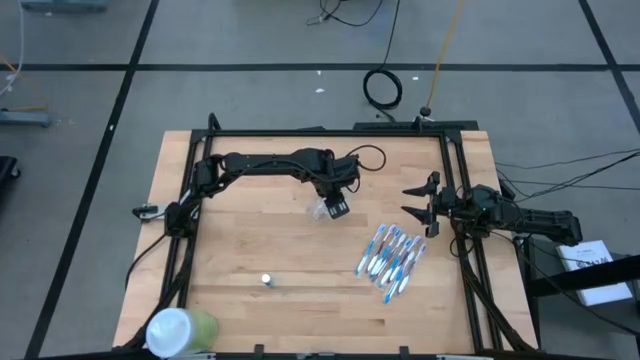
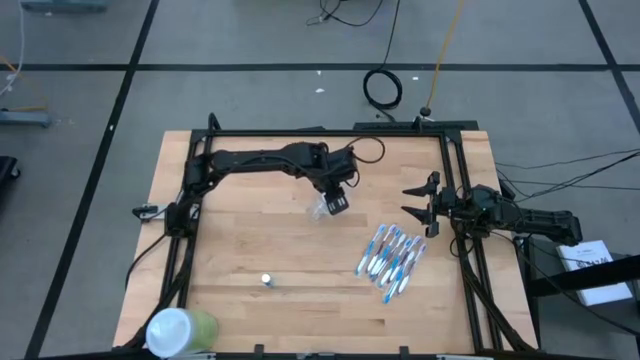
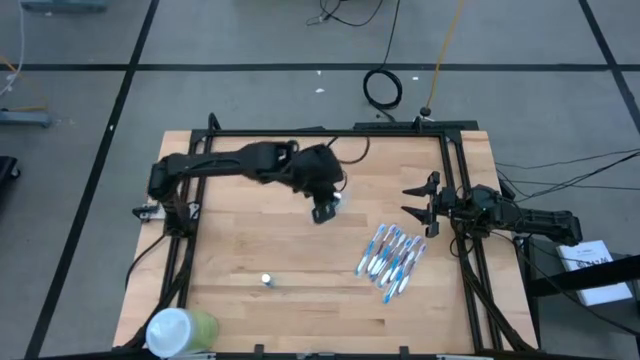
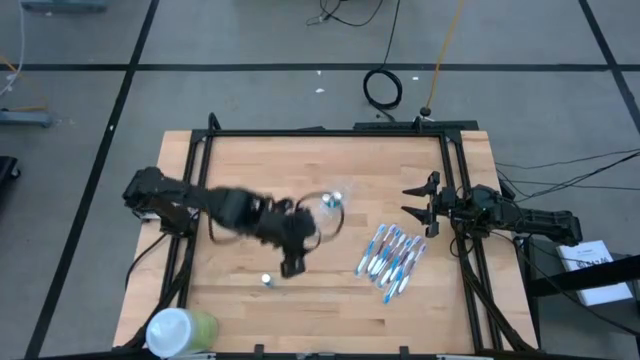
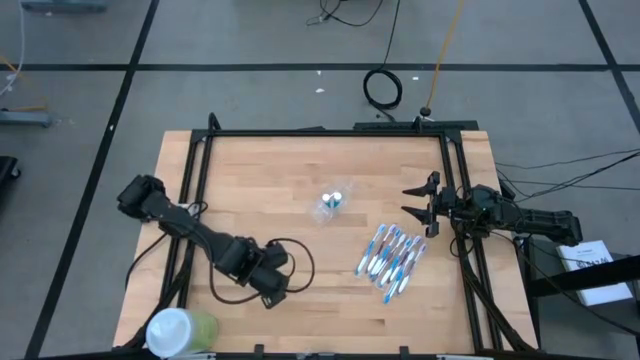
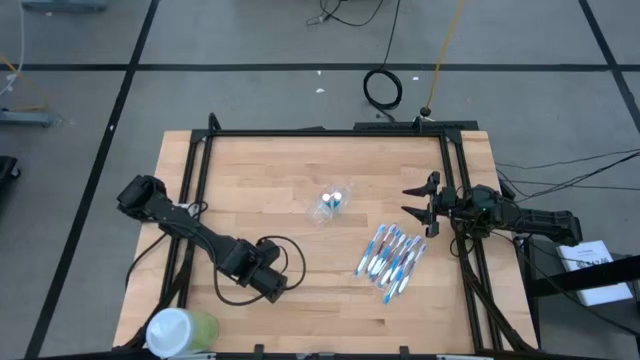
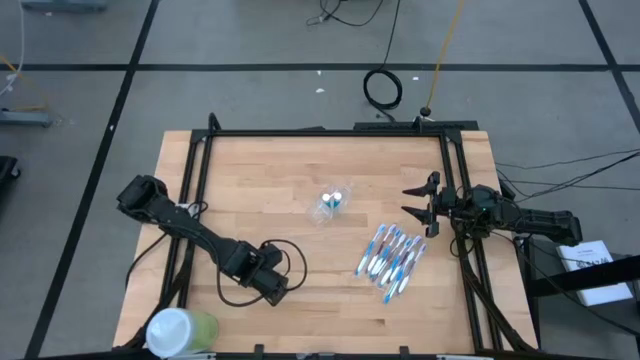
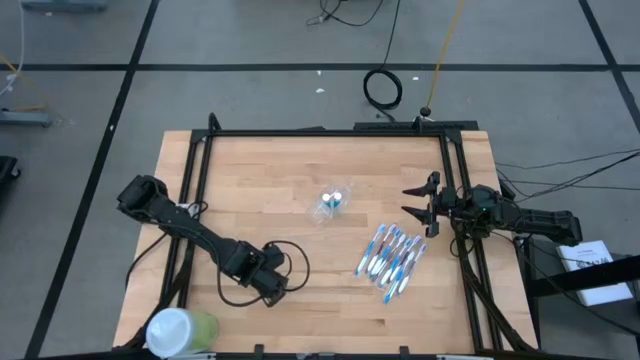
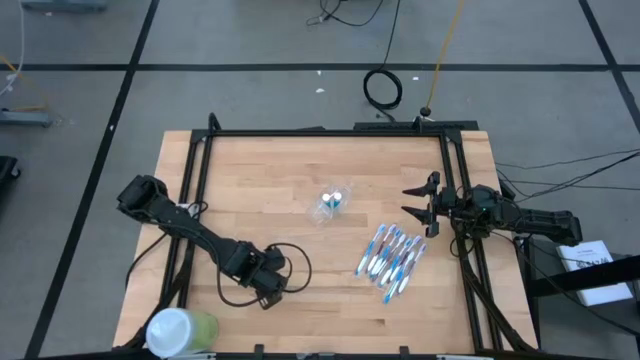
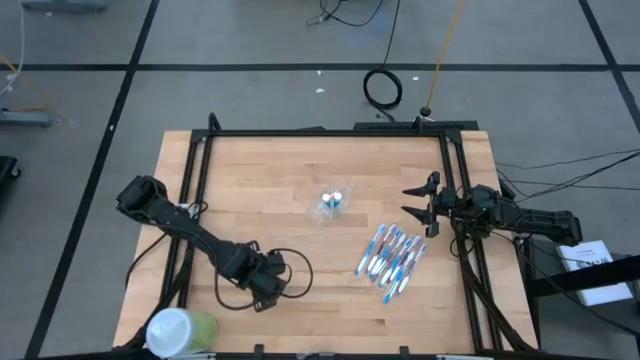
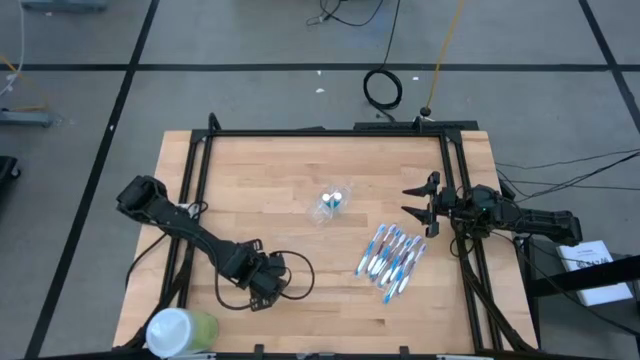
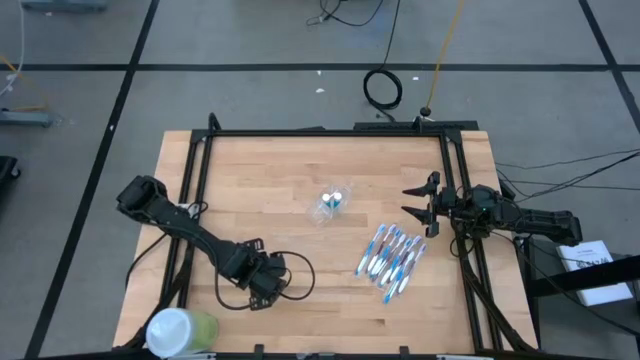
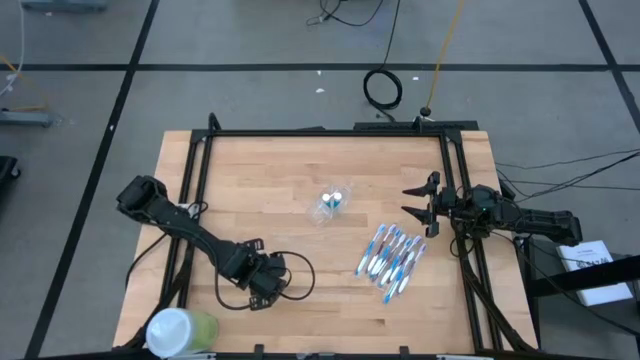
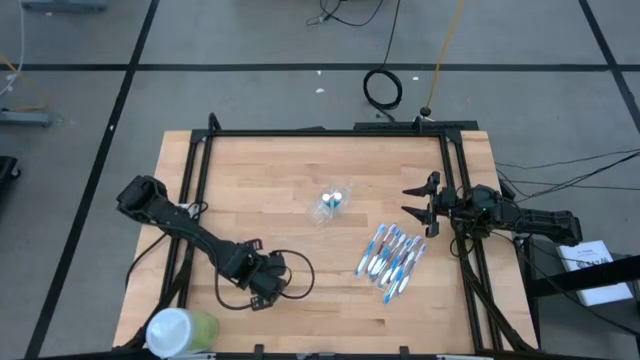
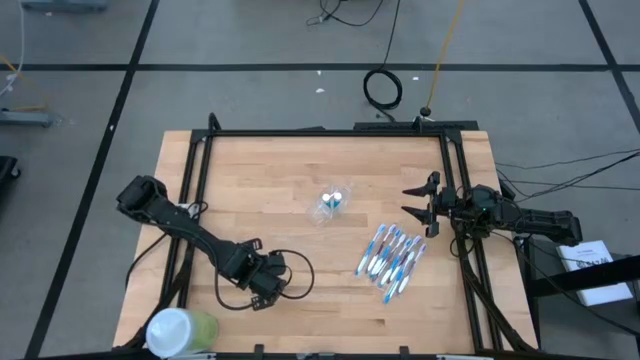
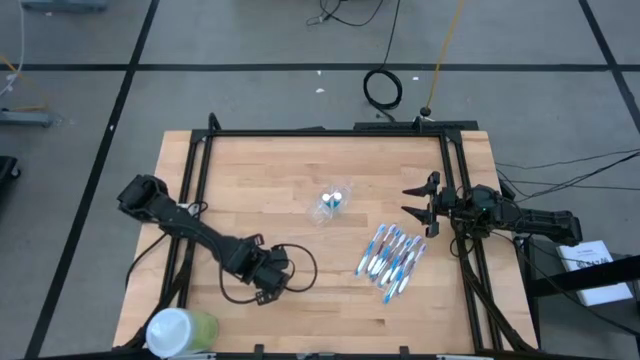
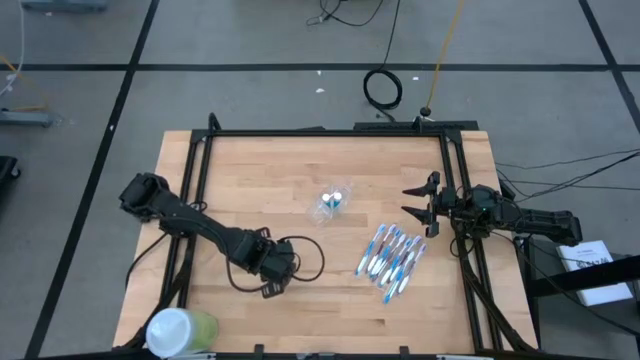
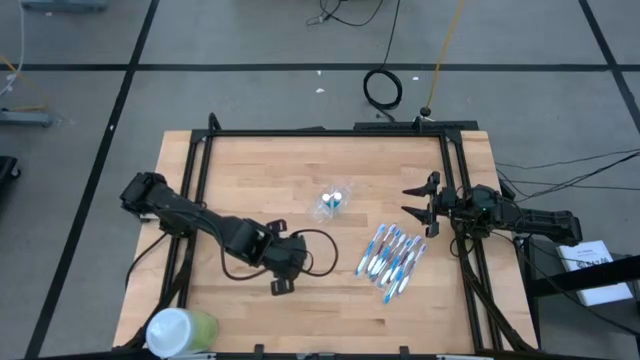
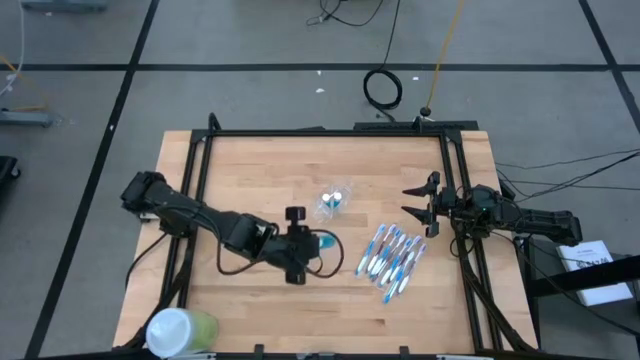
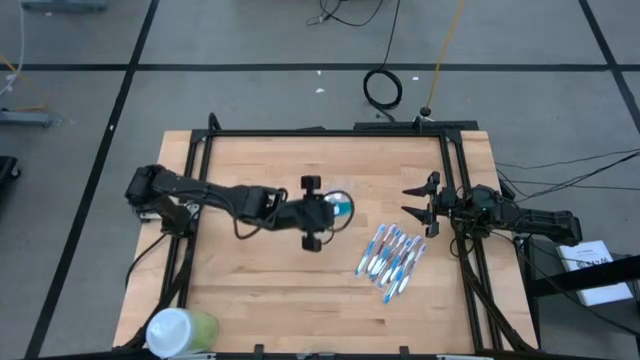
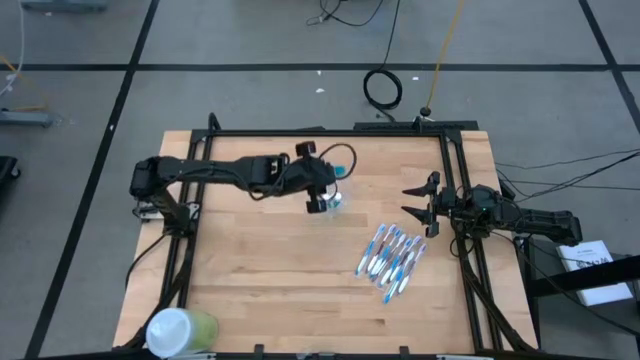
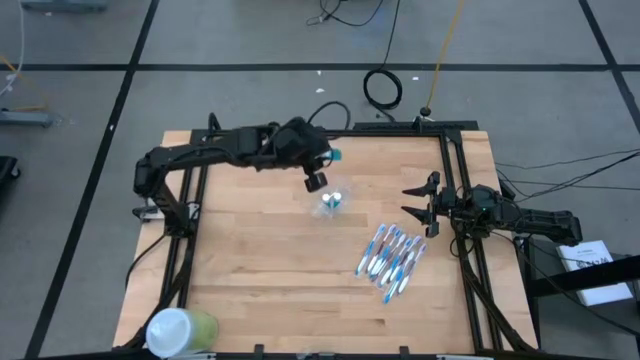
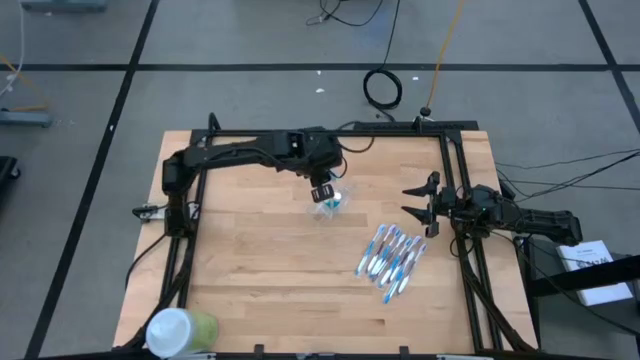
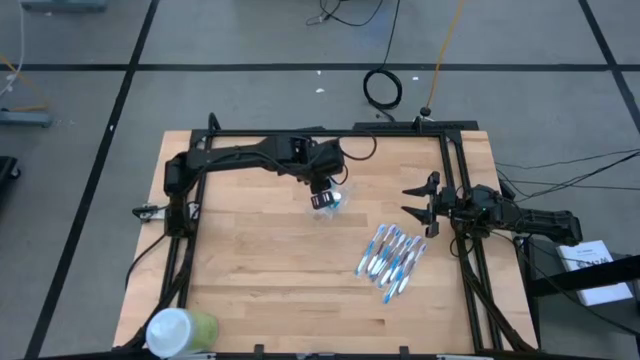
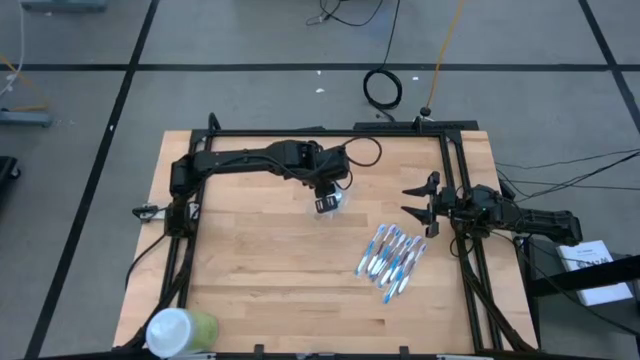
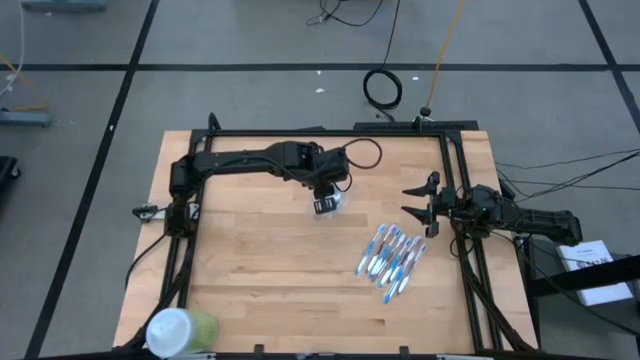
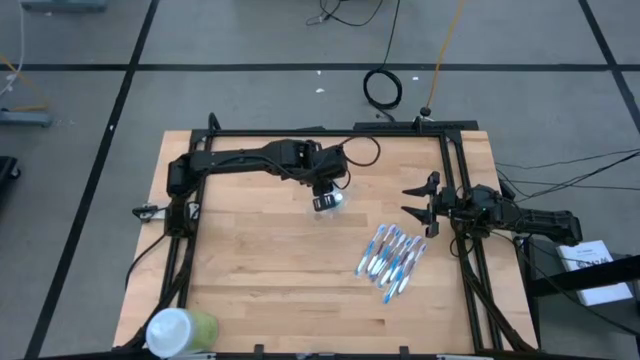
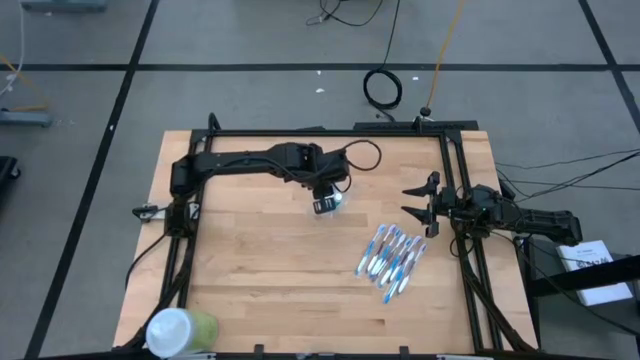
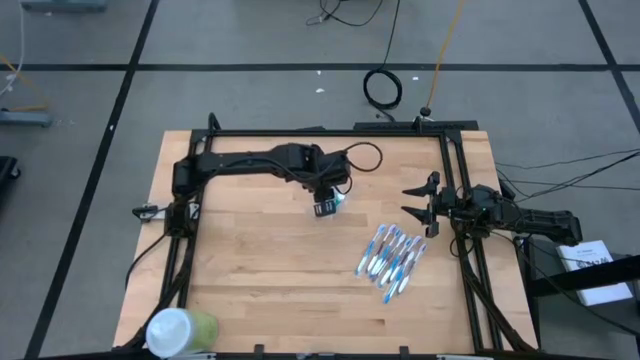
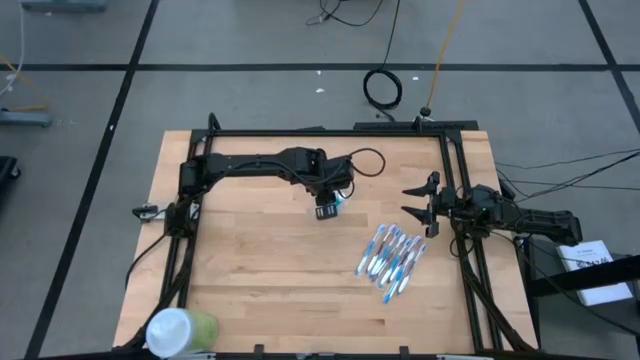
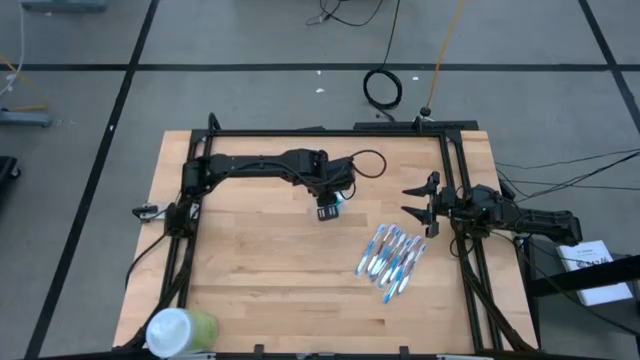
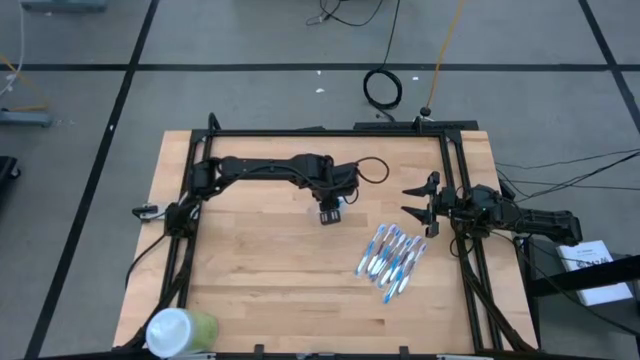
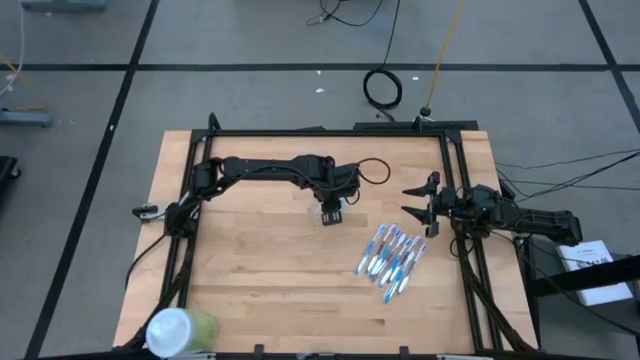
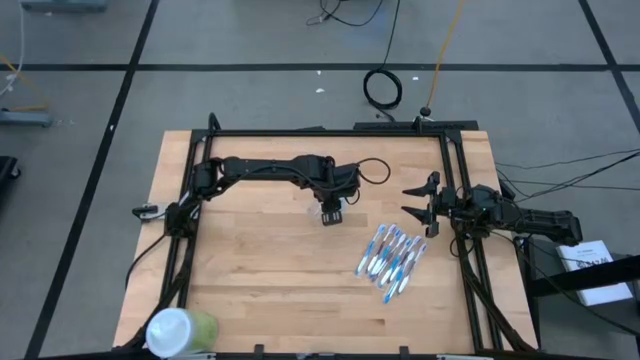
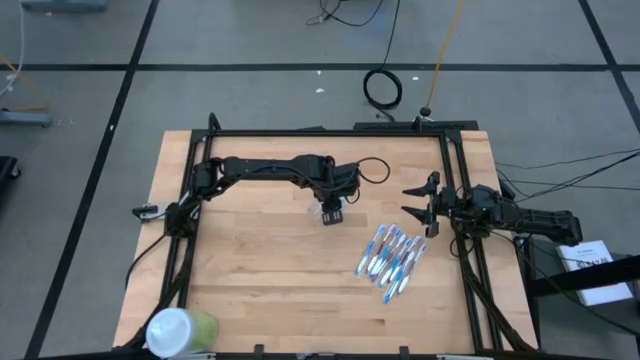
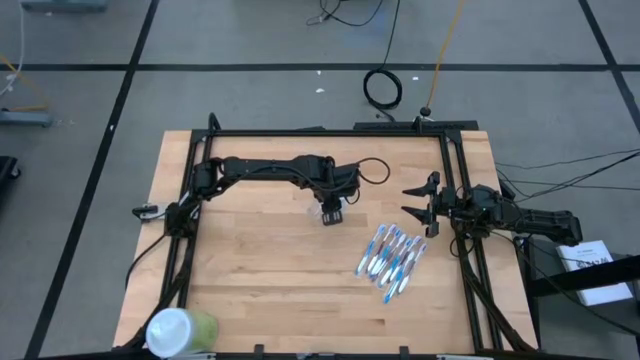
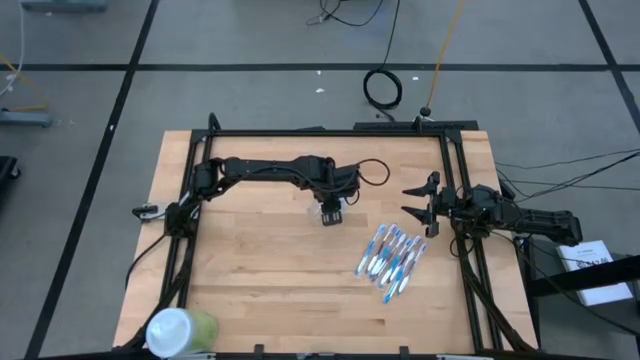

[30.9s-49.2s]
Task: Pick & Place toothbrushing station
Put the blue mouthwash into the transparent organizer

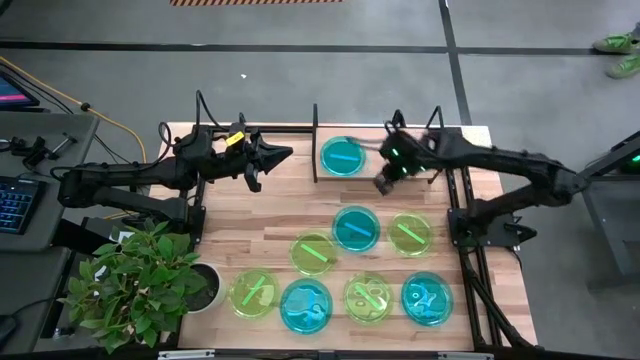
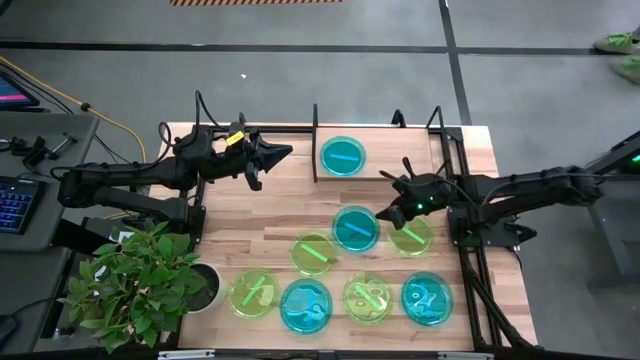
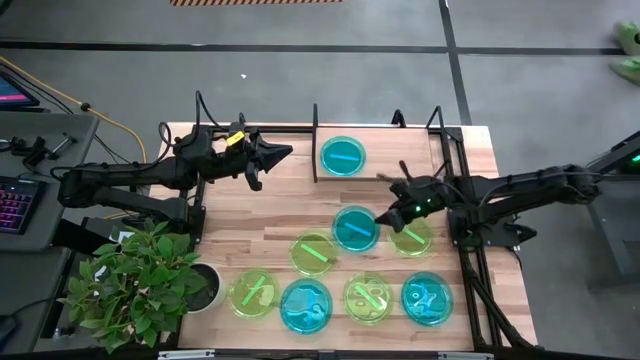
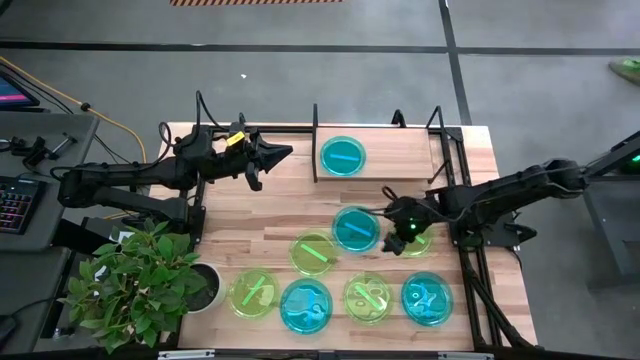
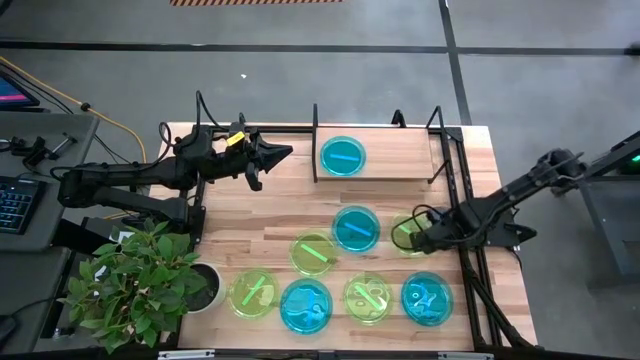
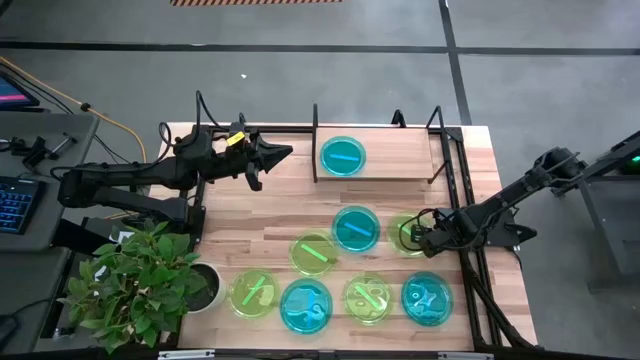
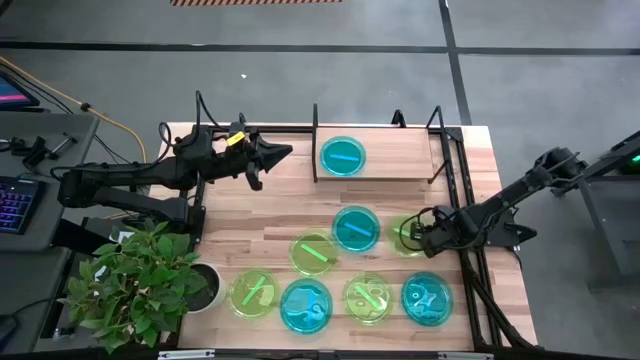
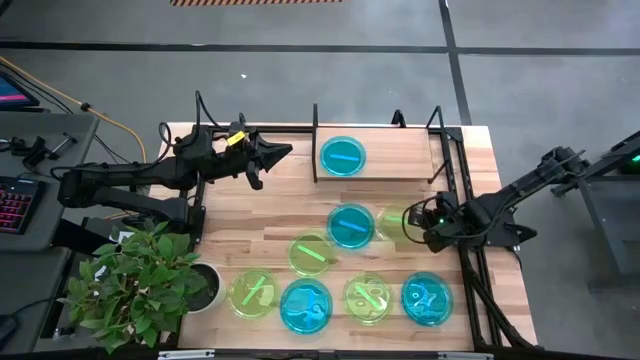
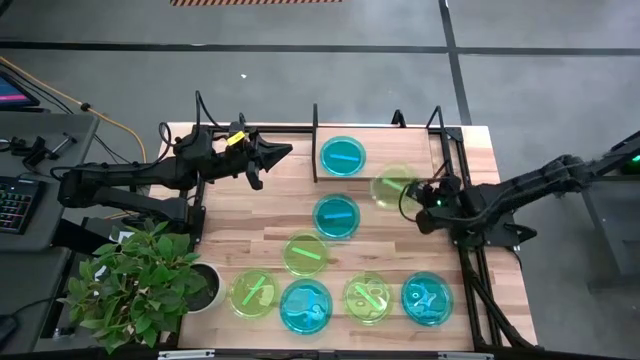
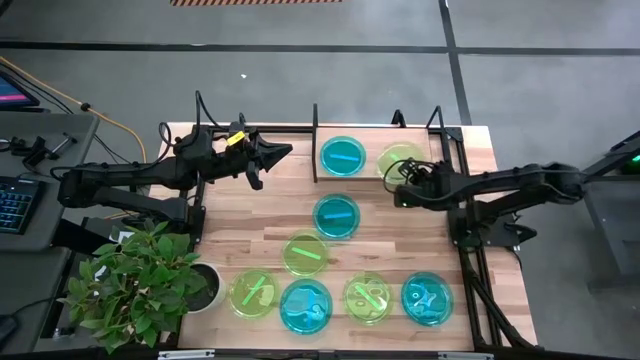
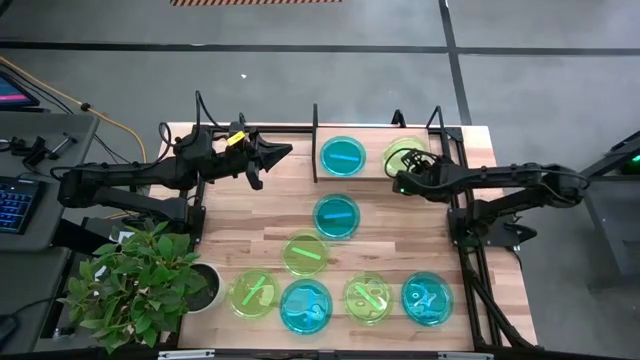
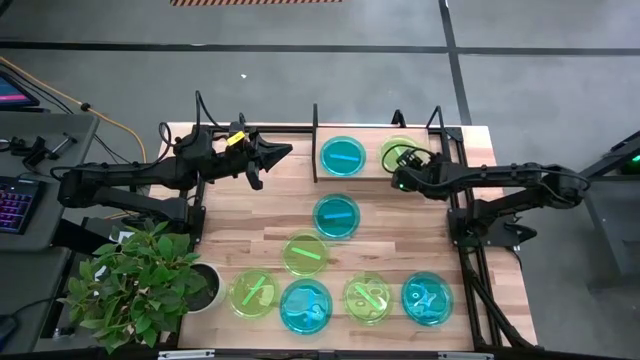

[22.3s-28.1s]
Task: Place and stack plates onto a shelf
Put the top right green plate on the shelf
